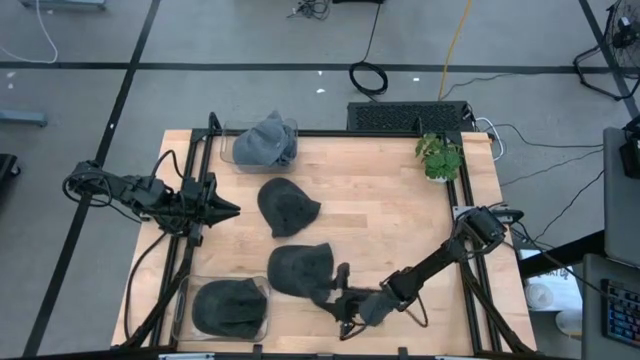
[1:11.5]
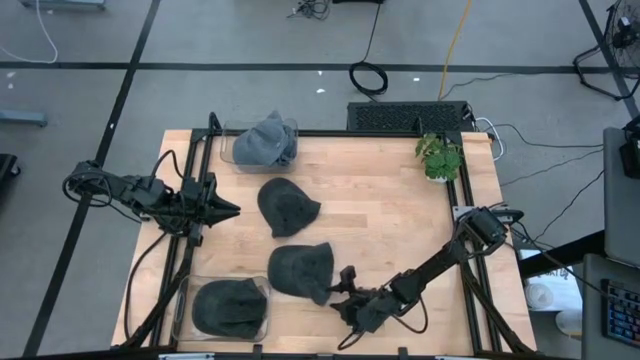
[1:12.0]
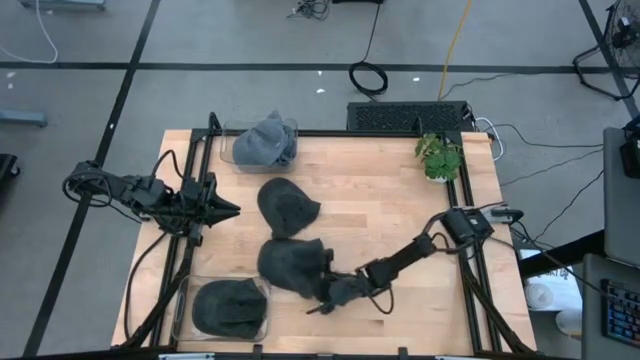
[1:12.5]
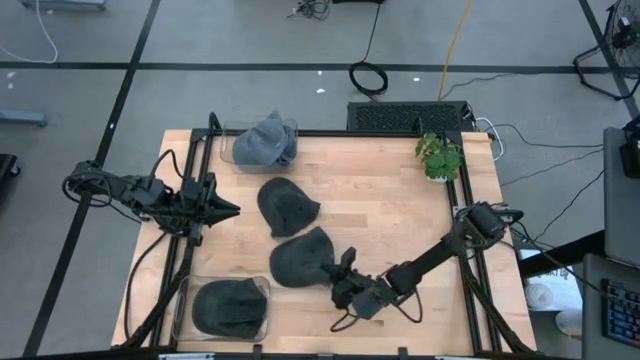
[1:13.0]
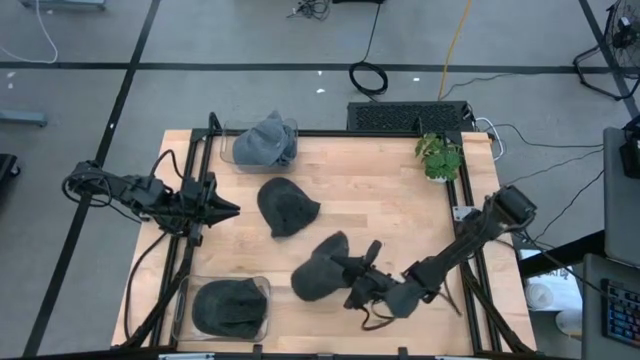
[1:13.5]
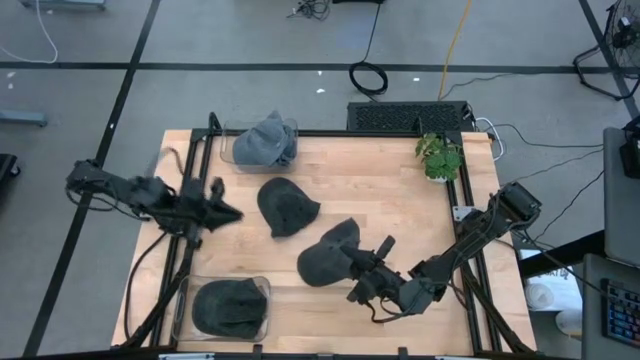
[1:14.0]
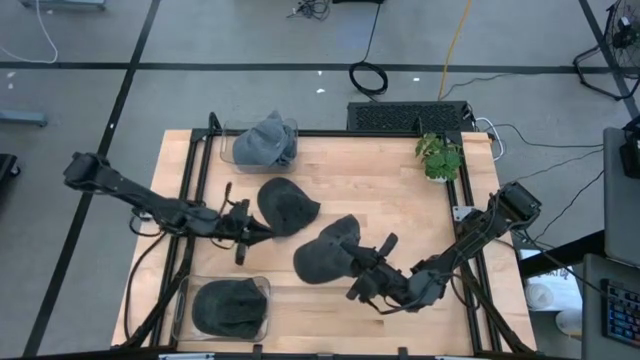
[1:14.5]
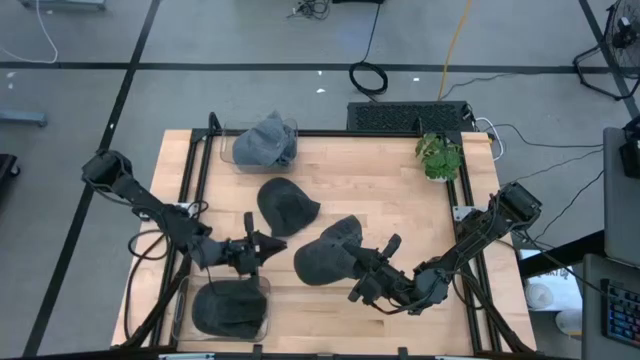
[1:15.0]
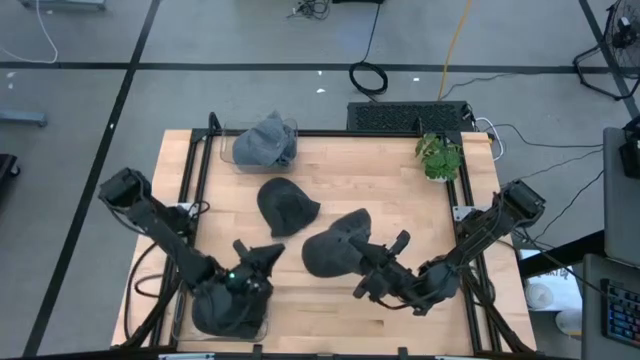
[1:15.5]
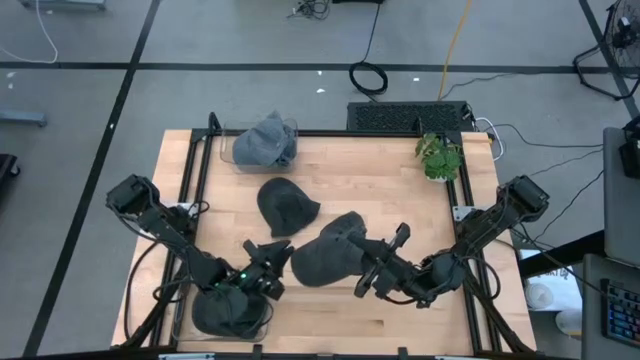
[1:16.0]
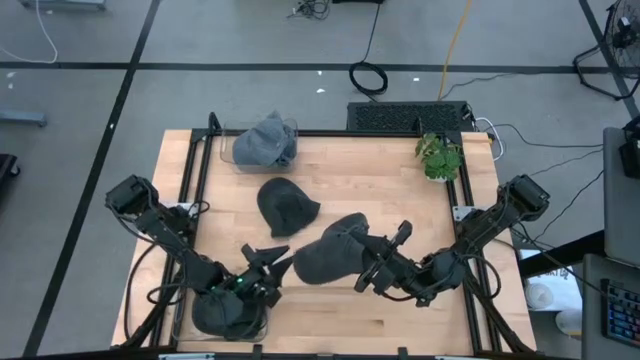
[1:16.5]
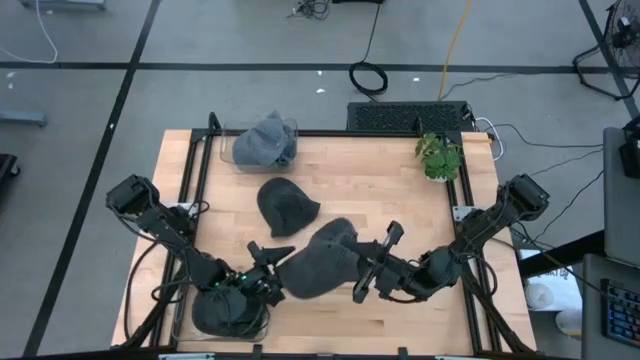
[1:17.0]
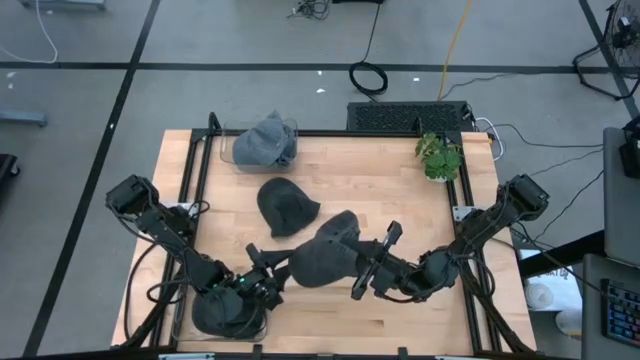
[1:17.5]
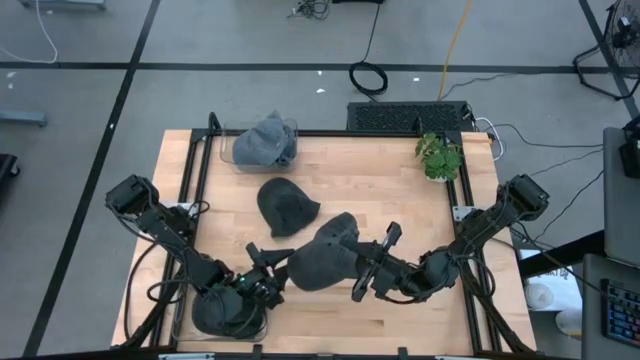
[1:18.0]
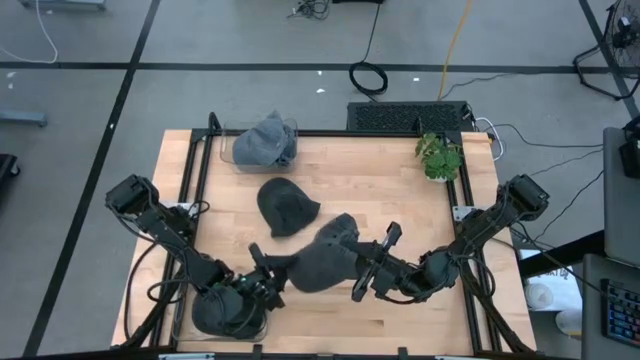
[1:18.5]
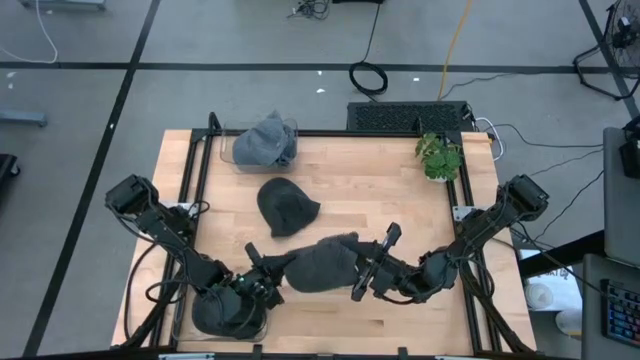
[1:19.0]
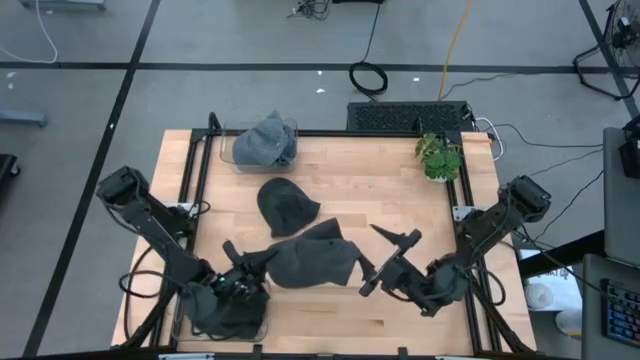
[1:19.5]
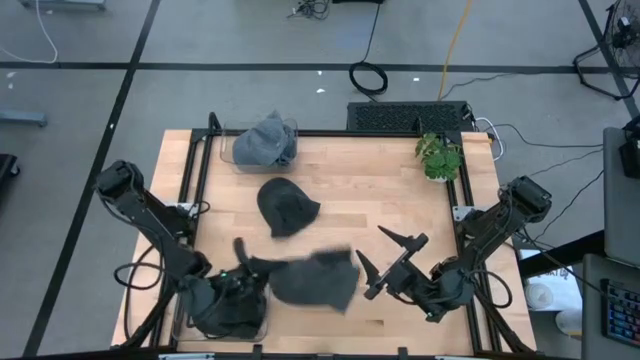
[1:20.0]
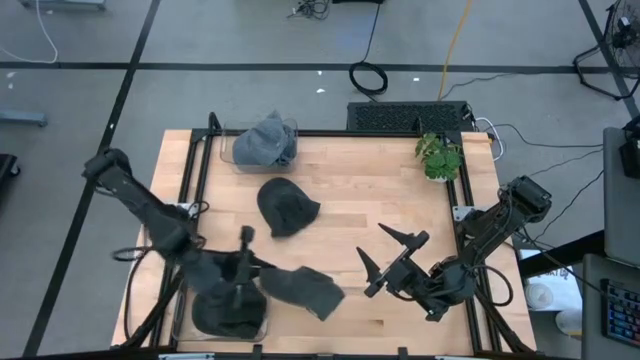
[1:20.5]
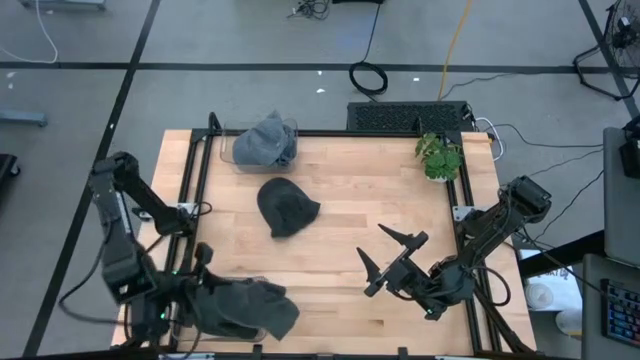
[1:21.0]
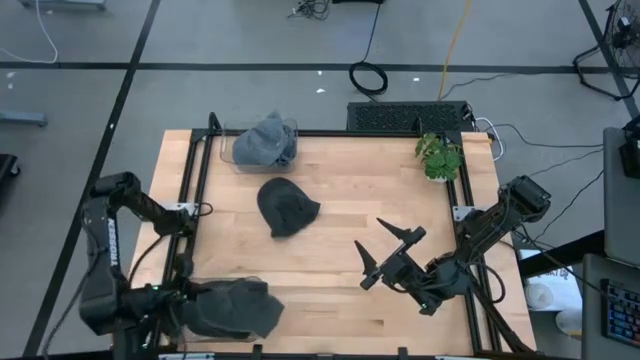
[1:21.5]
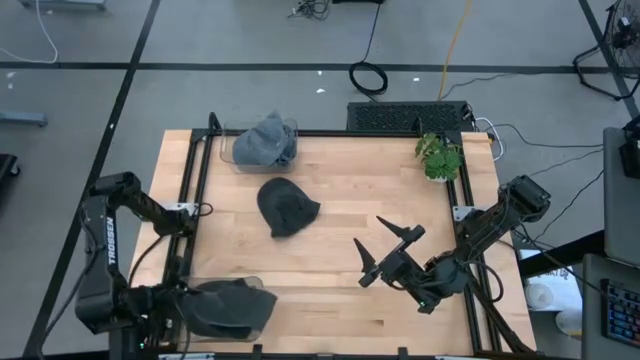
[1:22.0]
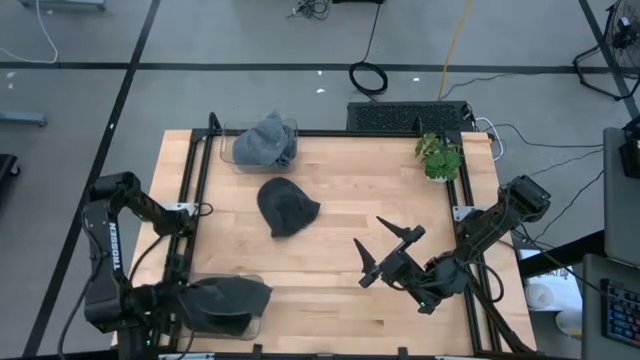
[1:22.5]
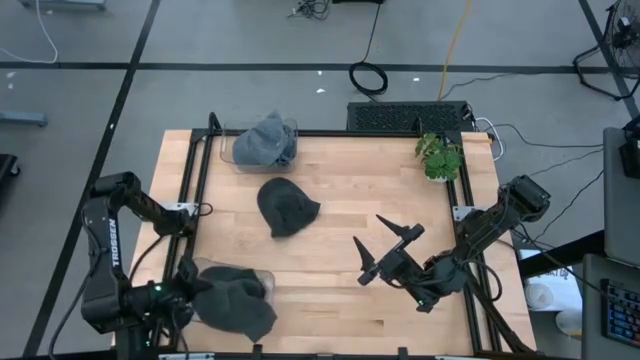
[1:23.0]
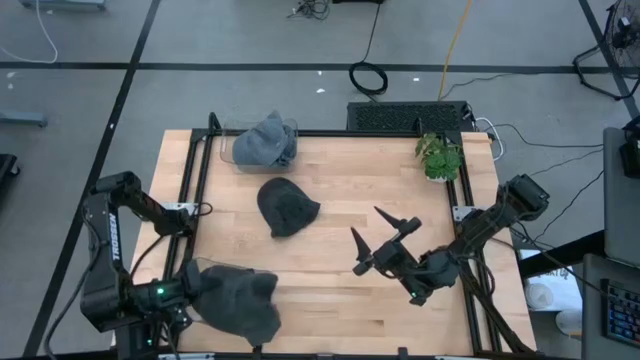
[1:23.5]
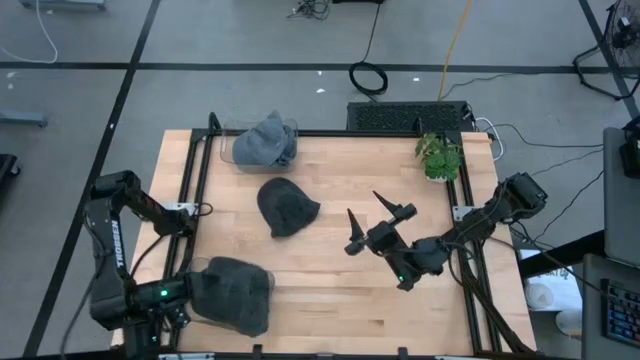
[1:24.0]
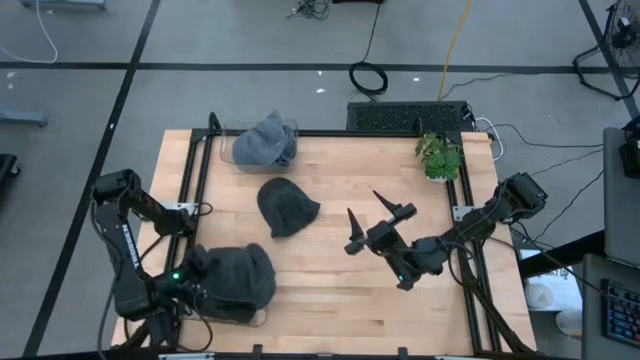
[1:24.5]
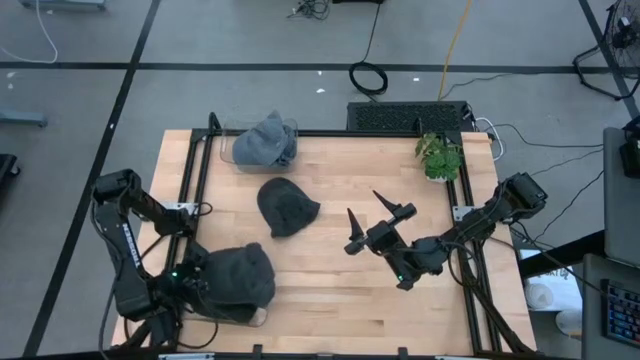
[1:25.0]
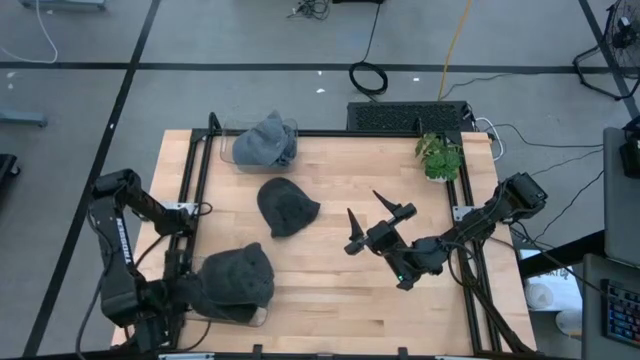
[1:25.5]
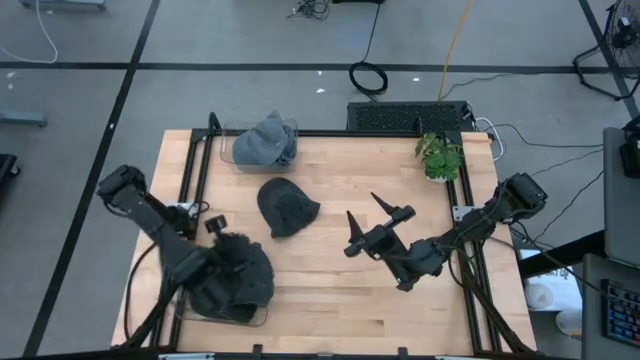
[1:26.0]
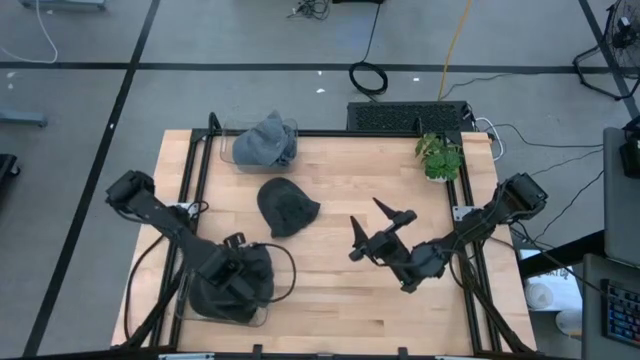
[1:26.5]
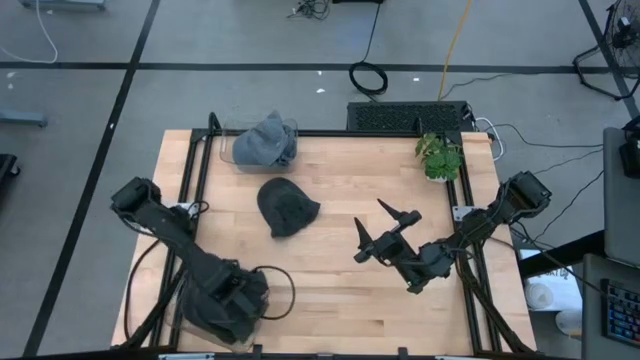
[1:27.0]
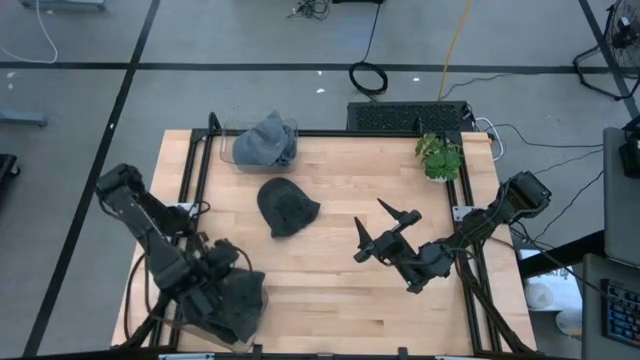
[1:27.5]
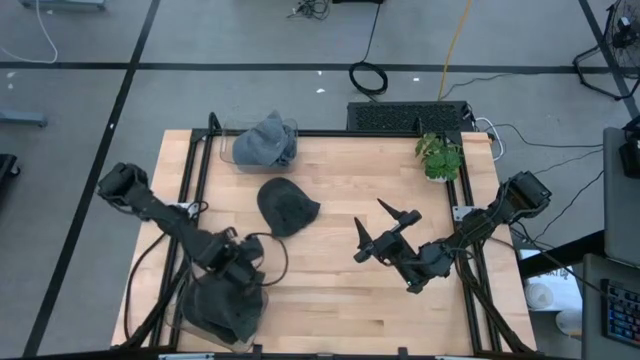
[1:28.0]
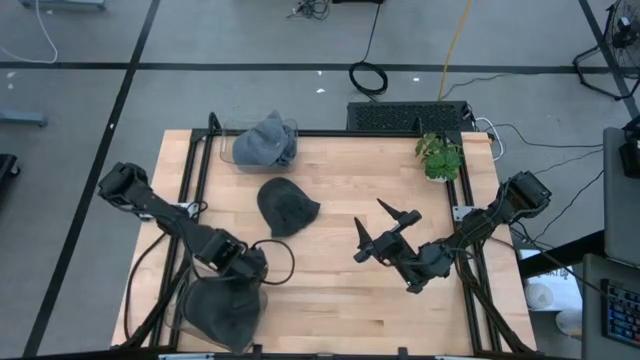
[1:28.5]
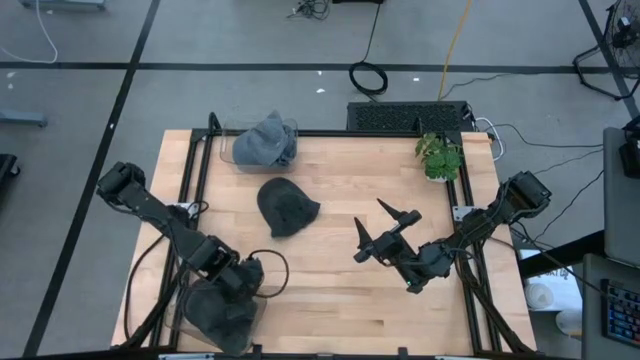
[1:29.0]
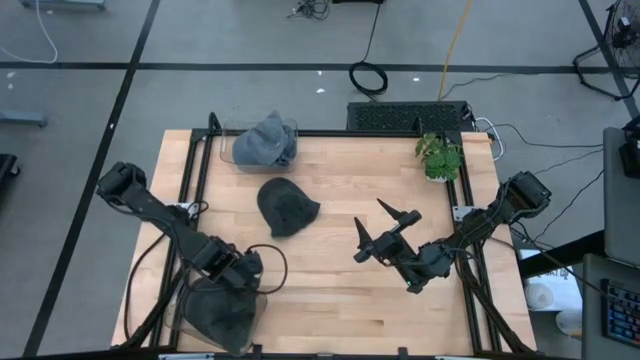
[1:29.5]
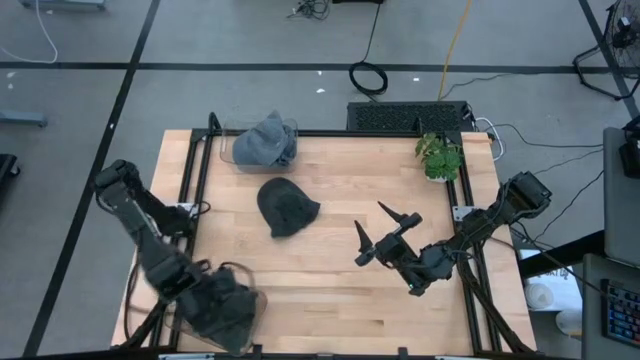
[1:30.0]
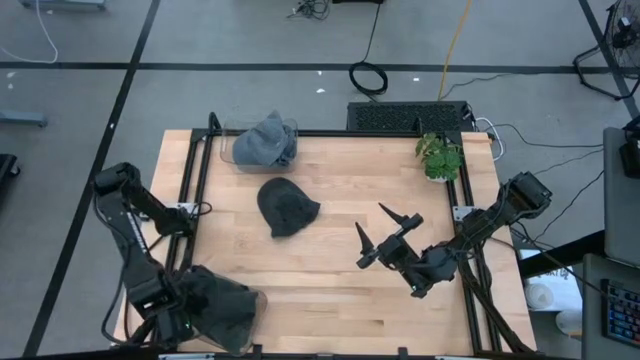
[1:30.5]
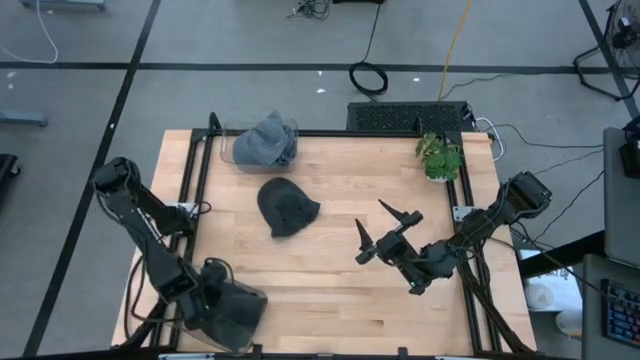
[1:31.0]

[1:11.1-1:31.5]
Task: Pick & Place hat
Put the bottom black cap into the bottom transparent bin

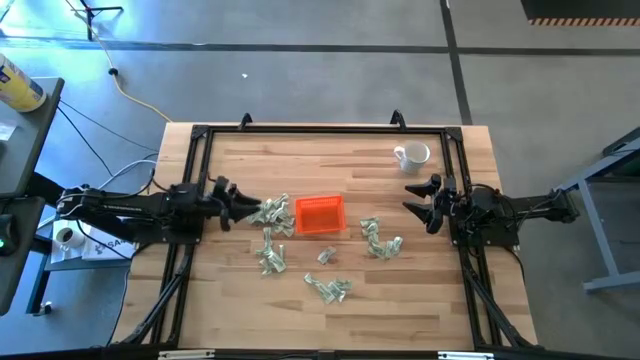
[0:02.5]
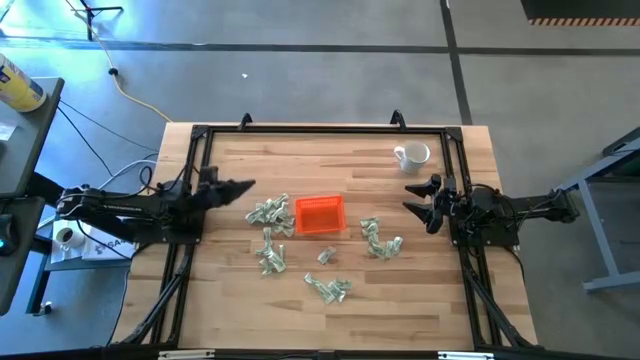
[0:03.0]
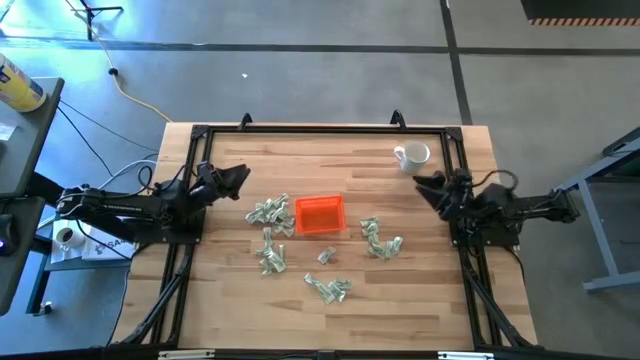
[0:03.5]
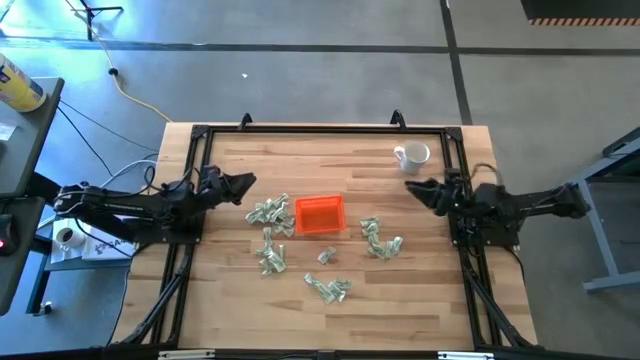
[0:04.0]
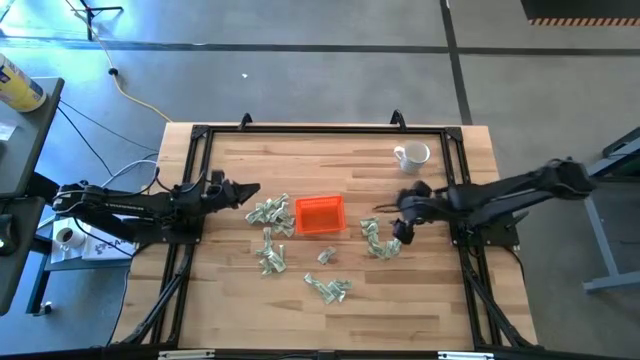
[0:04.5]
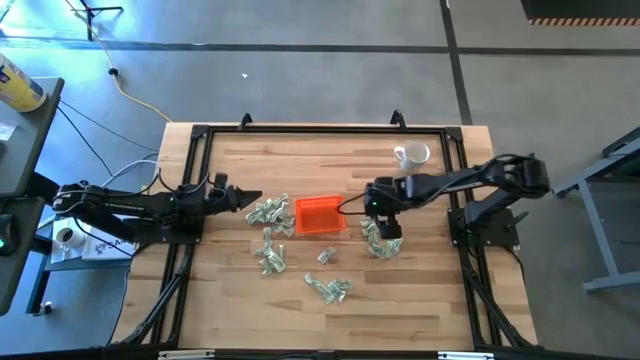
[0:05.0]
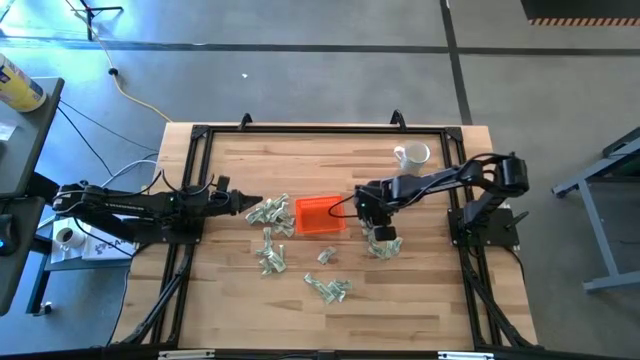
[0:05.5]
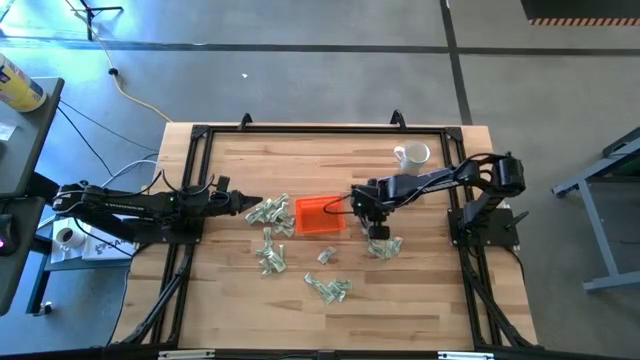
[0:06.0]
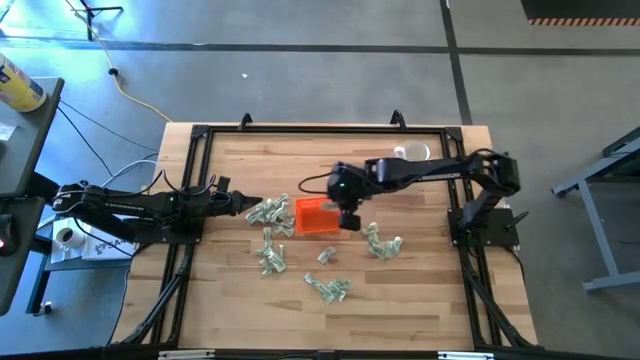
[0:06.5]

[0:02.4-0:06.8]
Task: Pick and place Stevia / Truvia into bins
Put the stevia packet into the orange bin
